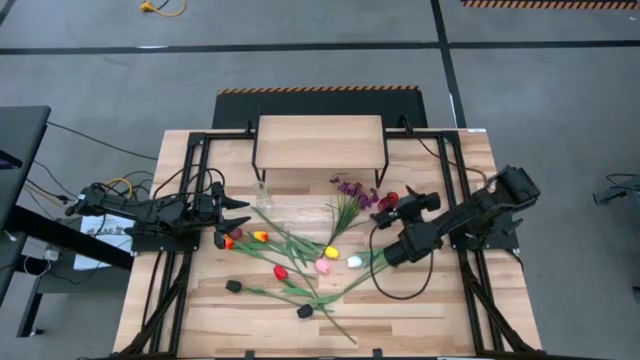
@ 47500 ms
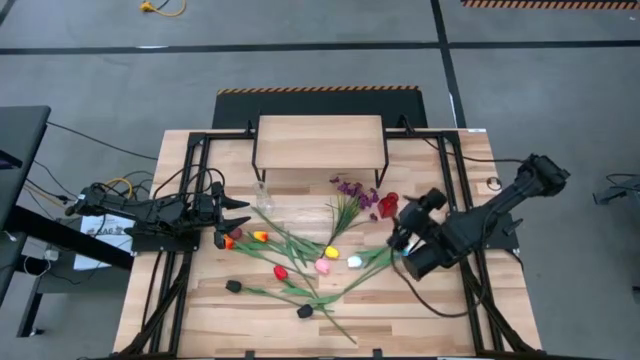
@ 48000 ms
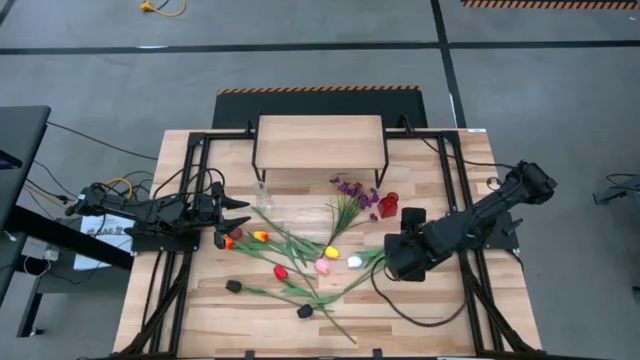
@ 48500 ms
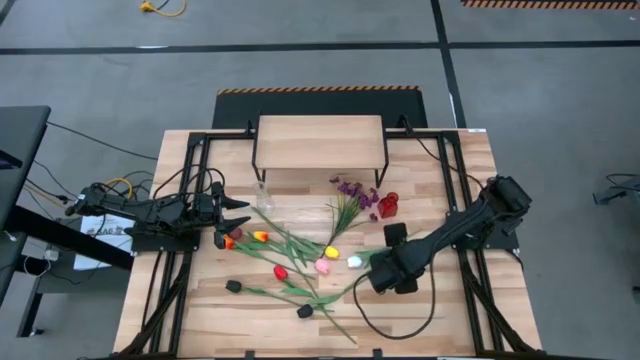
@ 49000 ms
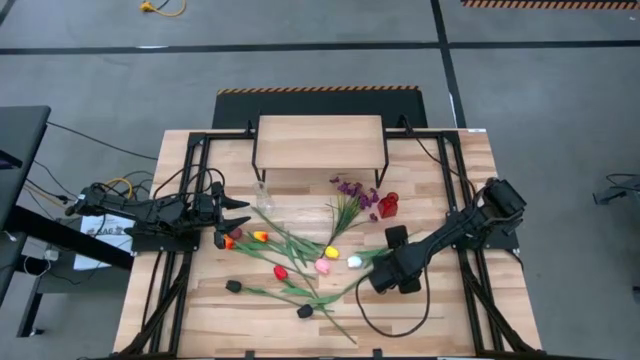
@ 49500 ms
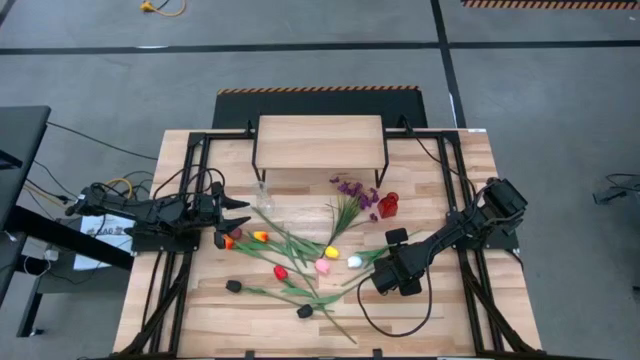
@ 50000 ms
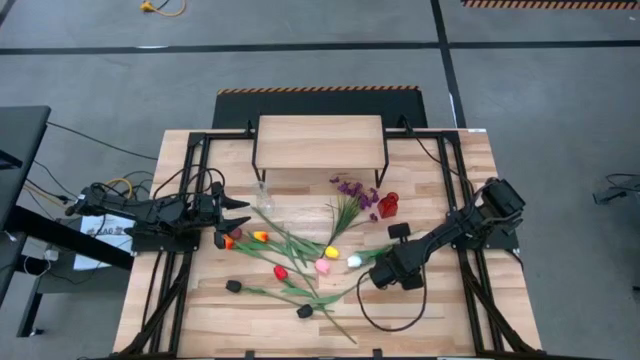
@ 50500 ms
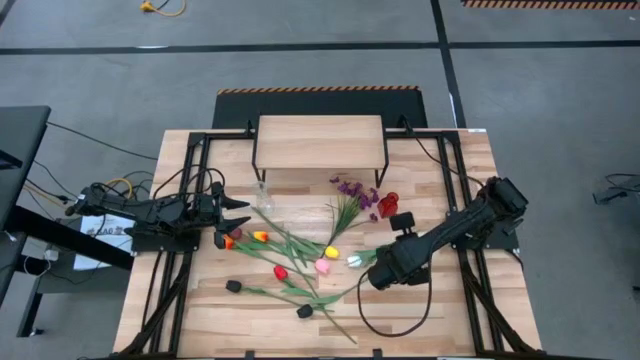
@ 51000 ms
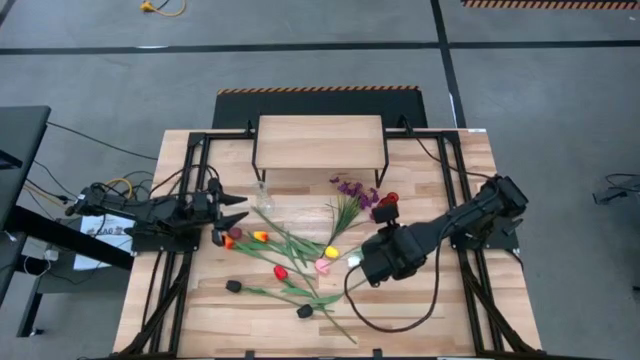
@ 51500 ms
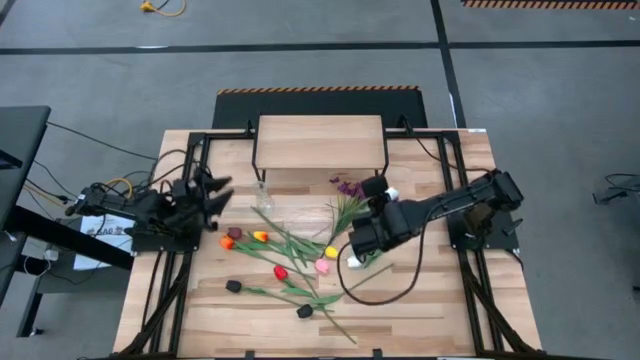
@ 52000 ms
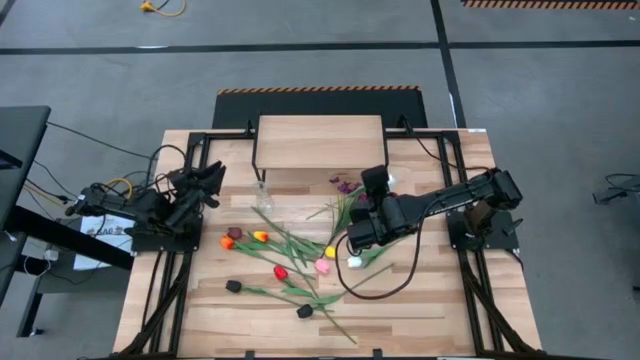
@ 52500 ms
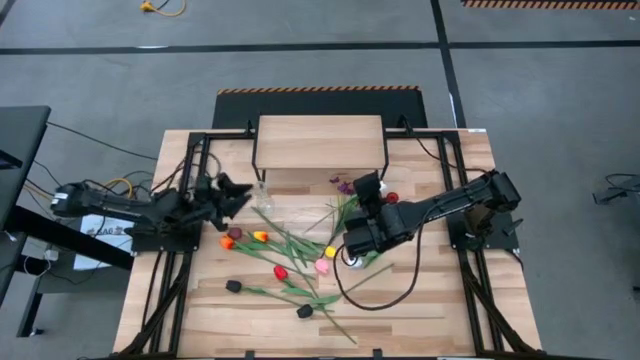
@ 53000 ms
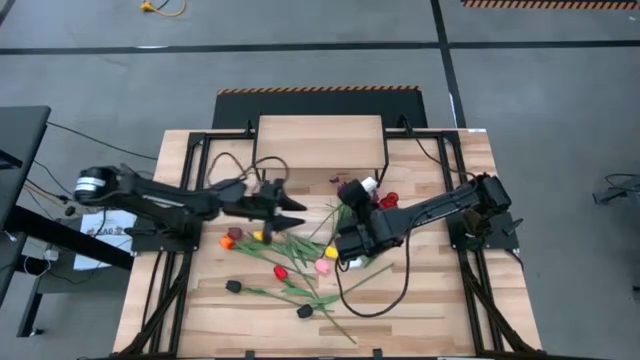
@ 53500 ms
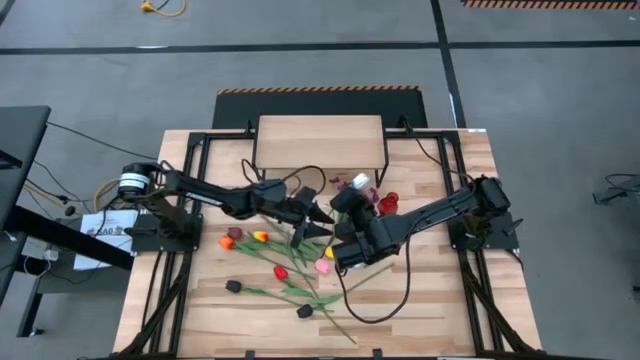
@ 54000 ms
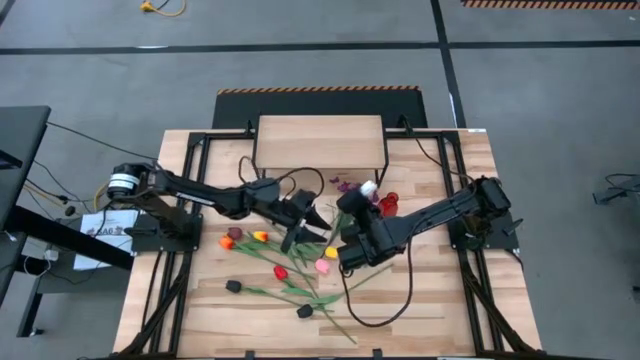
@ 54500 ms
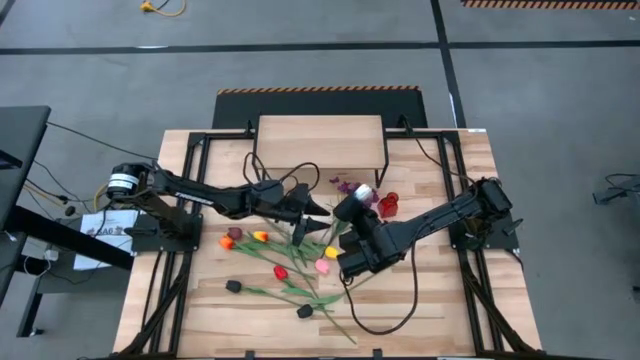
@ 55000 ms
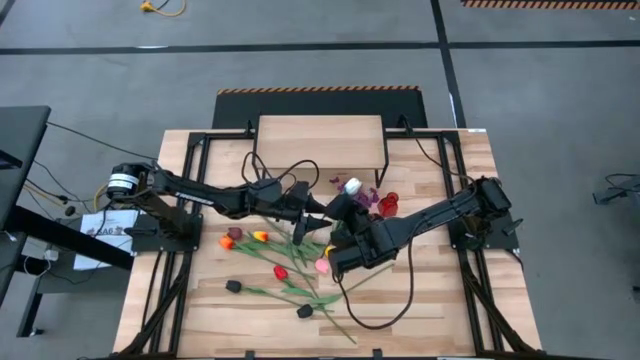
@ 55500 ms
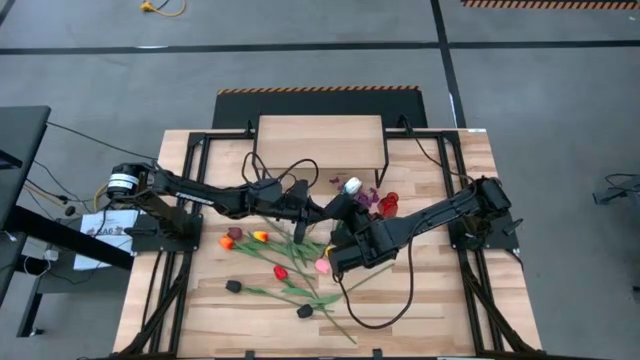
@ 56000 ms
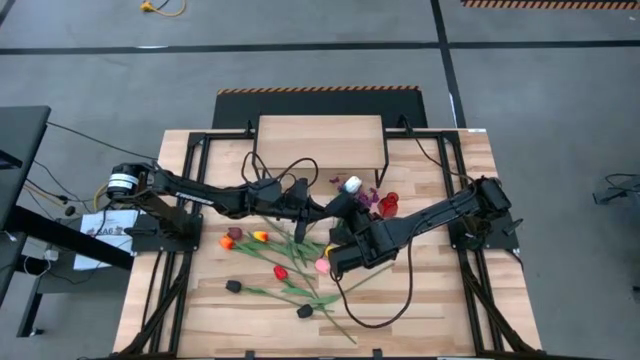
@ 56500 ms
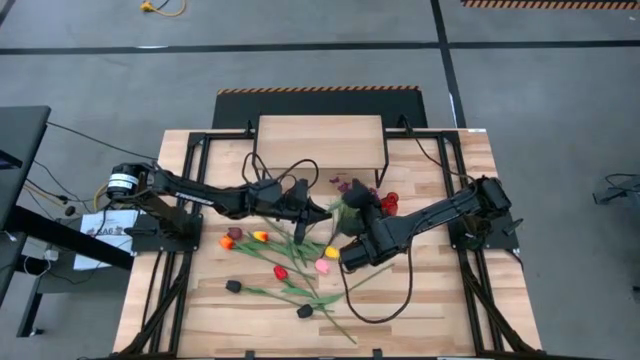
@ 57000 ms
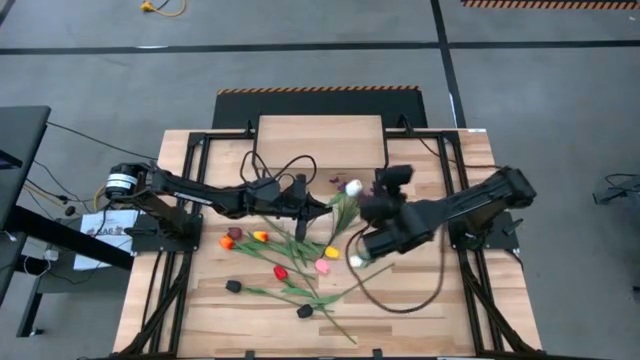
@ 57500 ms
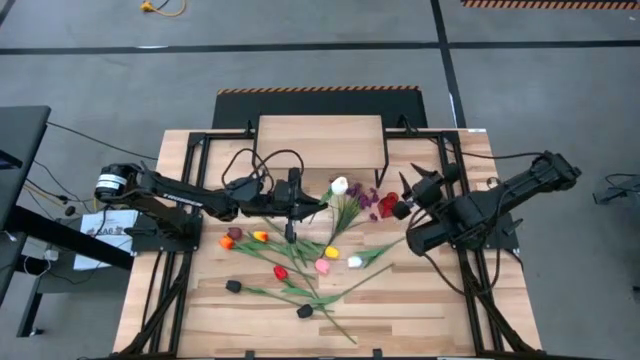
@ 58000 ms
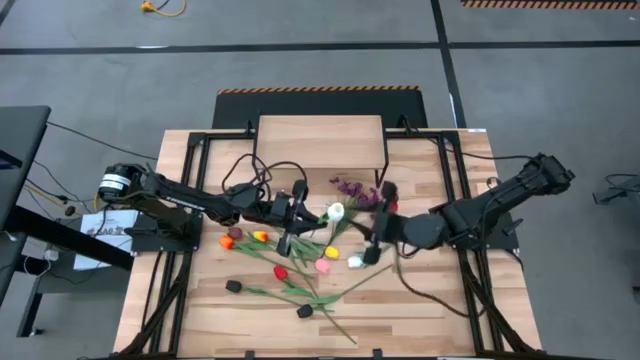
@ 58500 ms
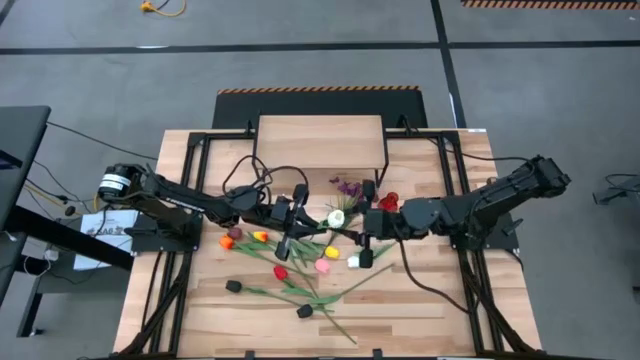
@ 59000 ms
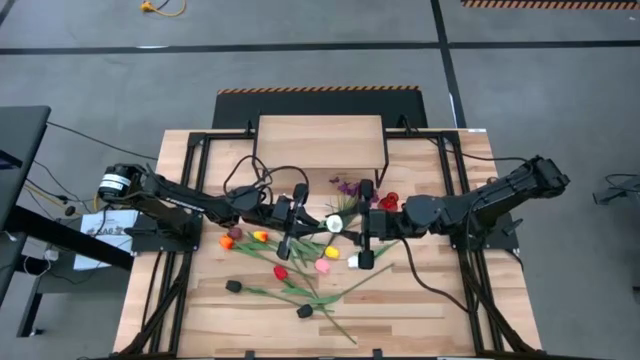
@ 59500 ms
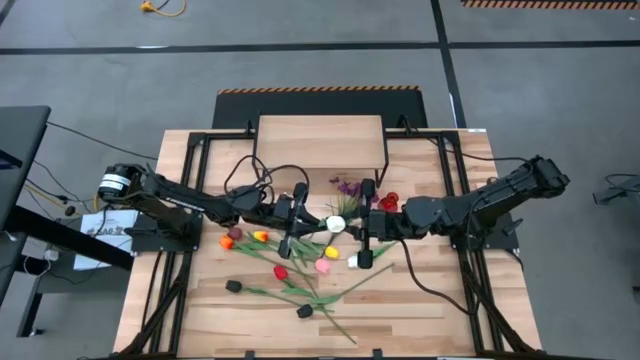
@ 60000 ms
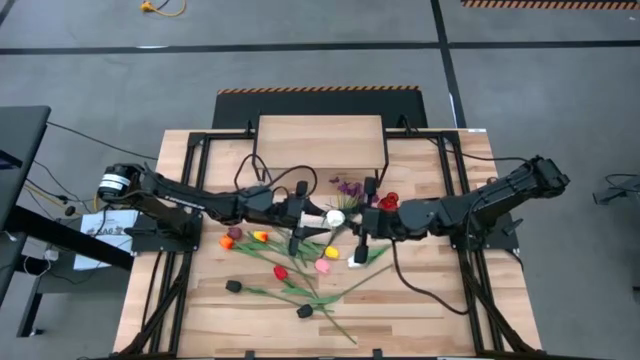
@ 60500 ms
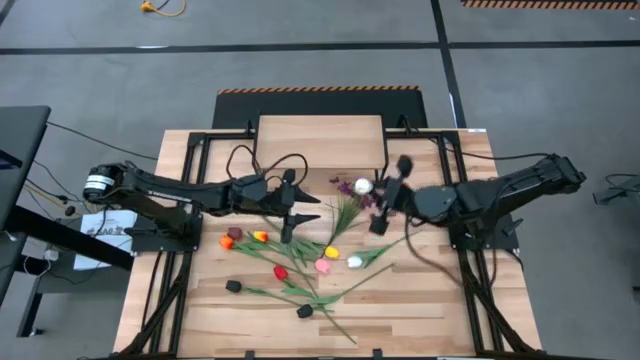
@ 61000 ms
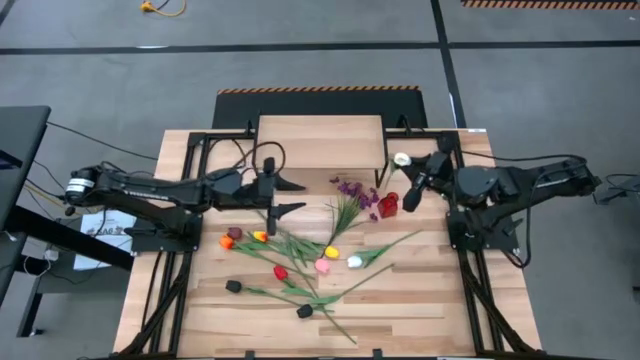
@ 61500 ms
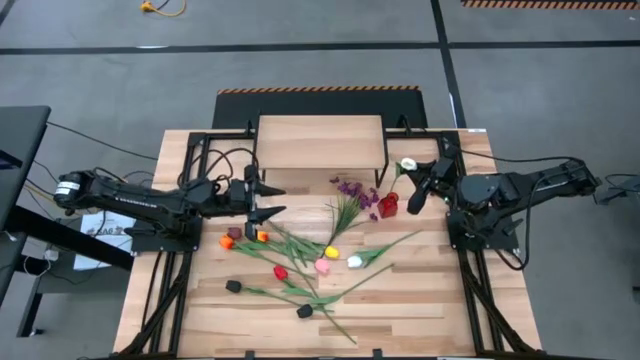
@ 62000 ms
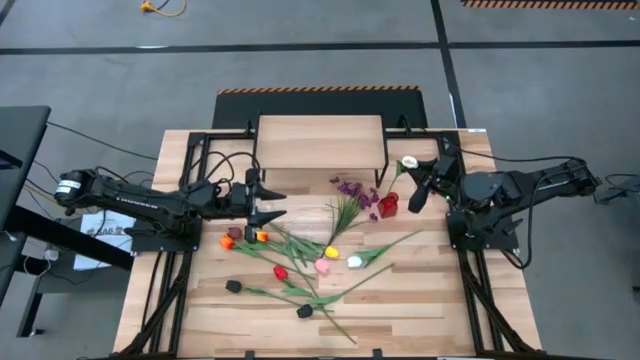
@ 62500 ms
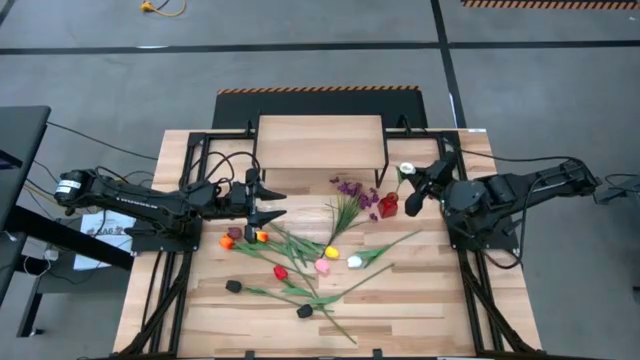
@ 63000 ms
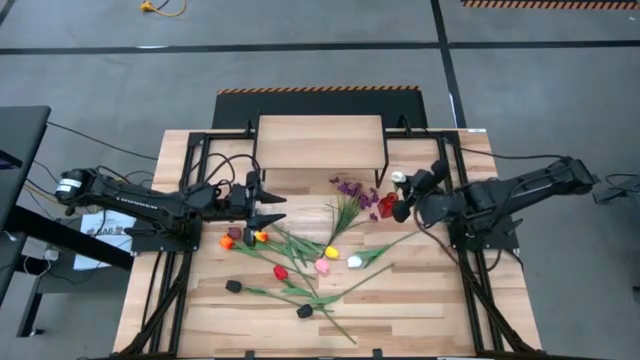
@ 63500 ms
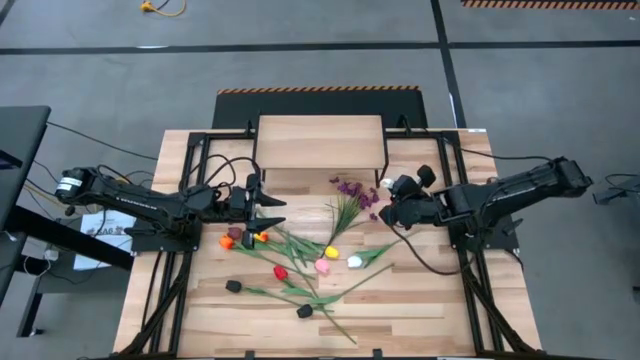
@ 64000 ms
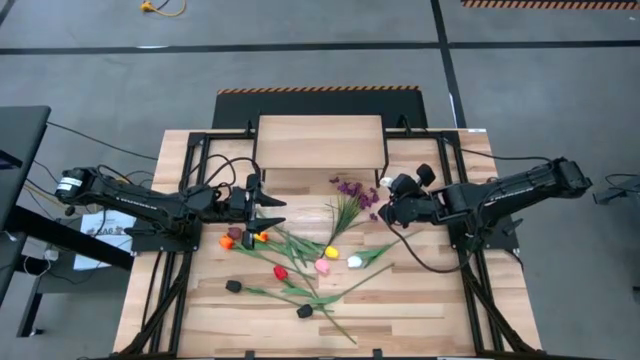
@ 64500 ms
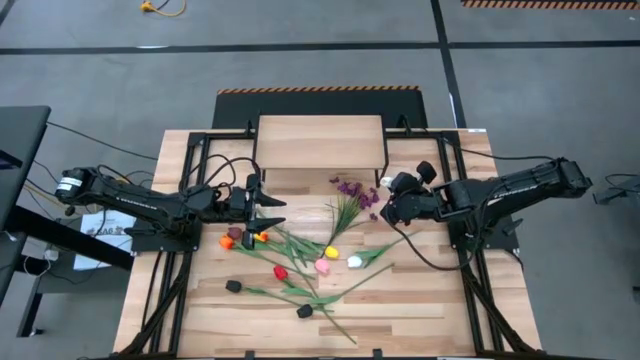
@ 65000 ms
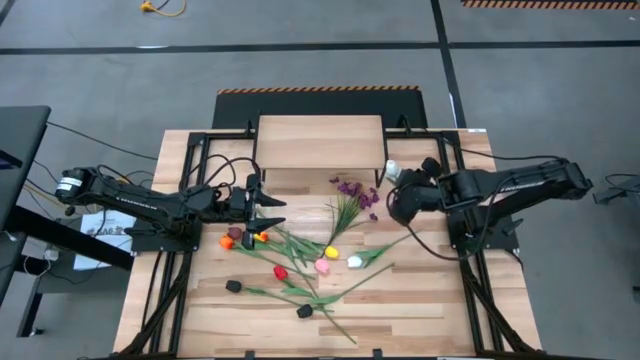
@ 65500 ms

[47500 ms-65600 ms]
Task: Pick and place flowers into a vace then onto a shelf
Put the bottom white flower into the red vase
